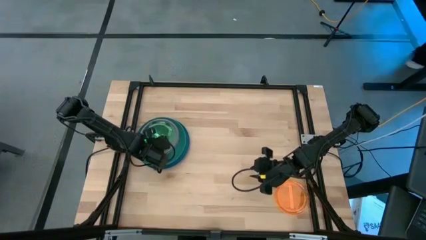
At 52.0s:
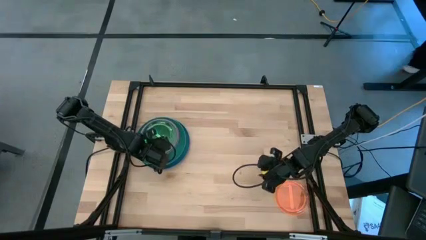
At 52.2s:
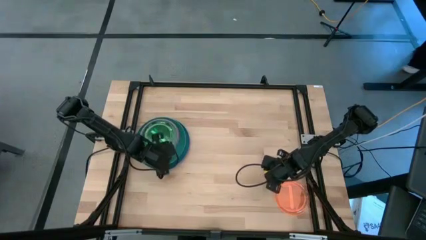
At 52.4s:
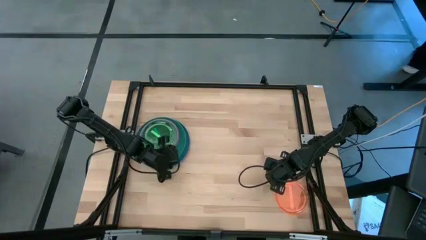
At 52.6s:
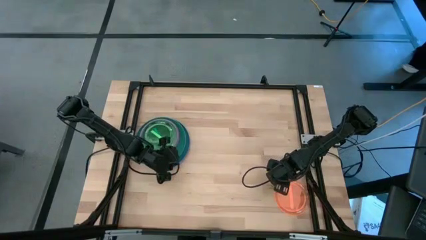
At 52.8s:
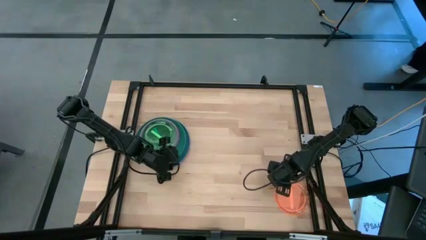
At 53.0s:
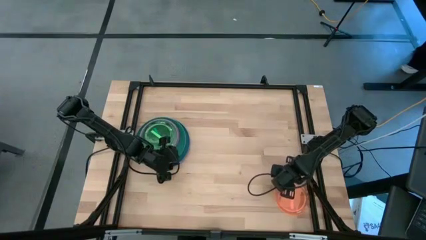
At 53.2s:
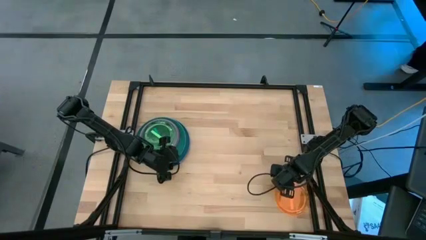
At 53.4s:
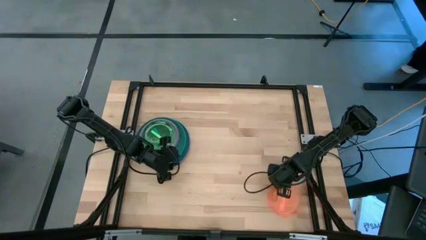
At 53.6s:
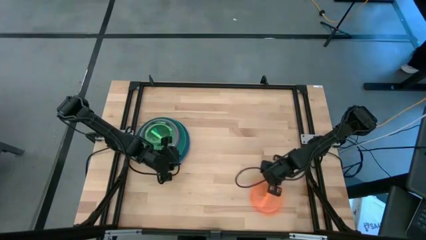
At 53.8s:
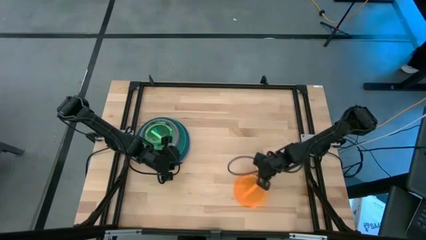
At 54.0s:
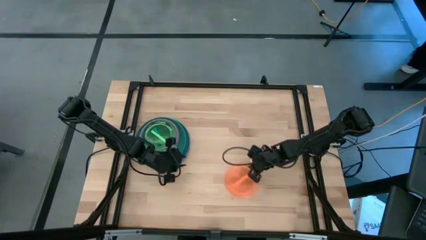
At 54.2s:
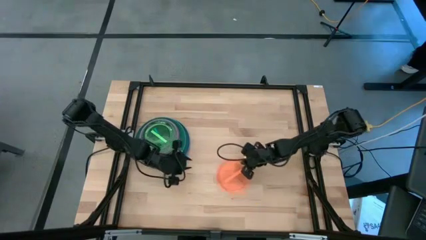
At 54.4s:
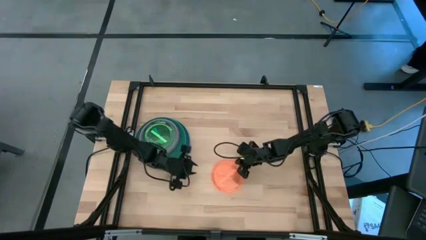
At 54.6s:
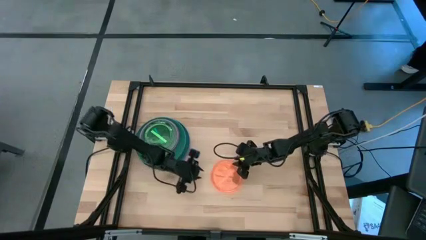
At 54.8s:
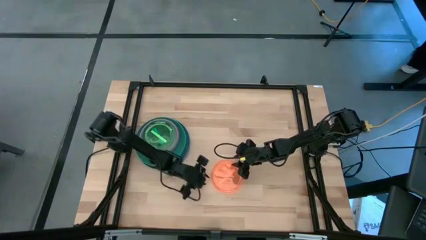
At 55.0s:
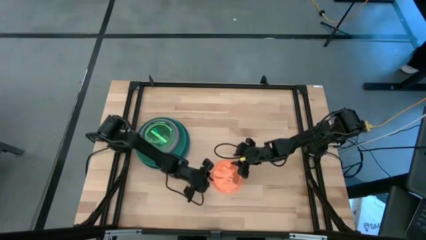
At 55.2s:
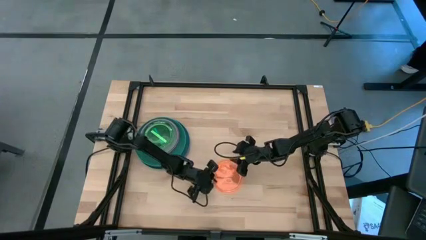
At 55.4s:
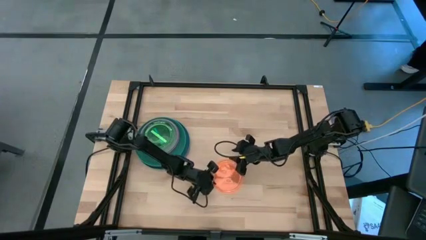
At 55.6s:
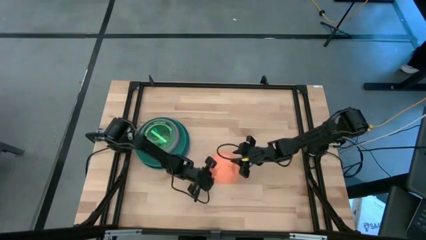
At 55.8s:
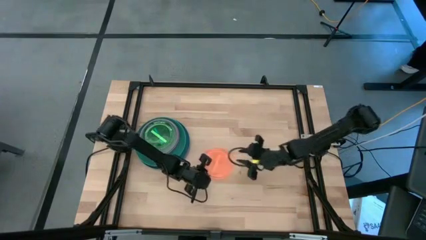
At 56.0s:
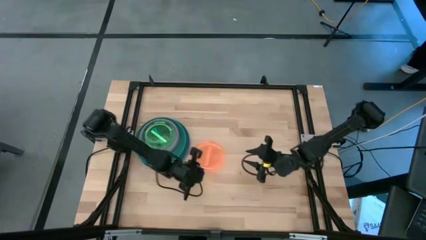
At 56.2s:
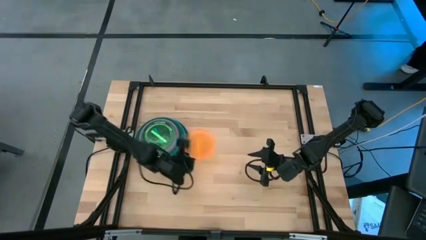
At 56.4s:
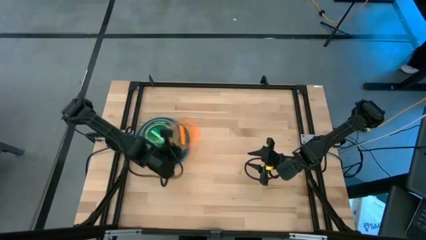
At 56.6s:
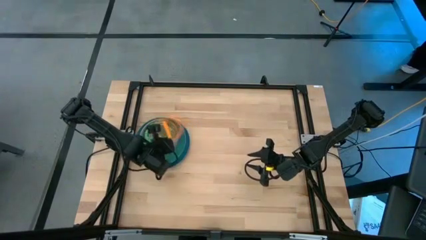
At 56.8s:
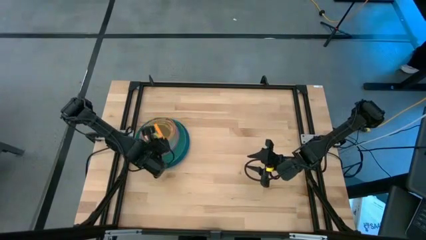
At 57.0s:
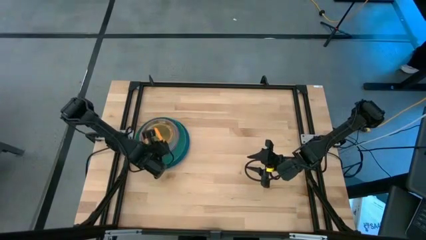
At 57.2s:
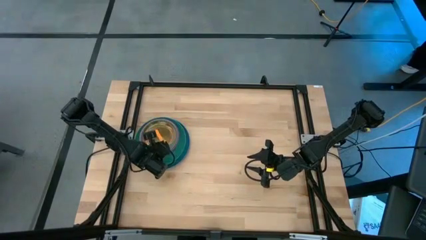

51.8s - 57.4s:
Task: Stack plastic plates
Stack the small orange plate on top of the small light green plate

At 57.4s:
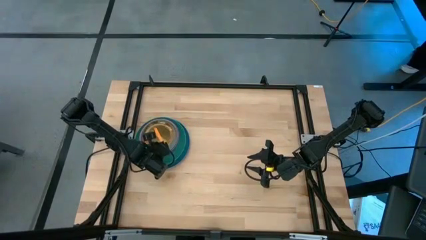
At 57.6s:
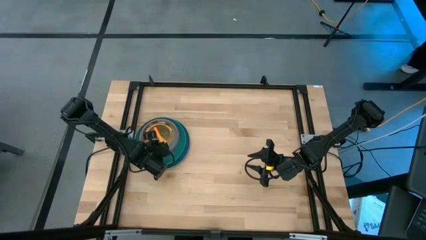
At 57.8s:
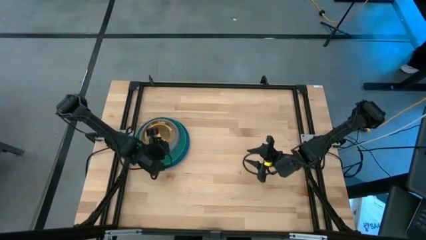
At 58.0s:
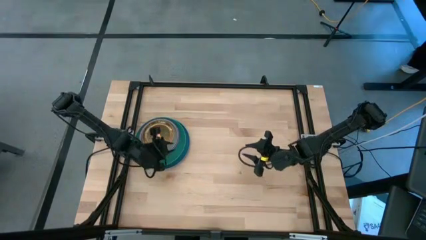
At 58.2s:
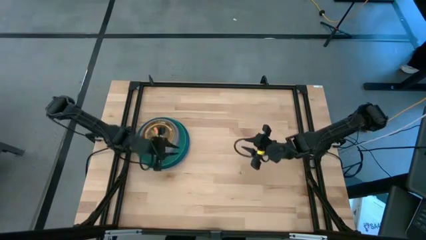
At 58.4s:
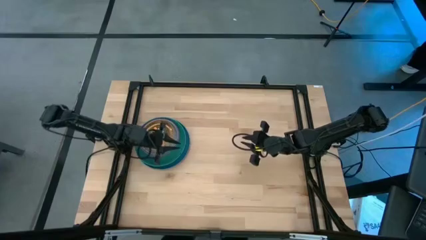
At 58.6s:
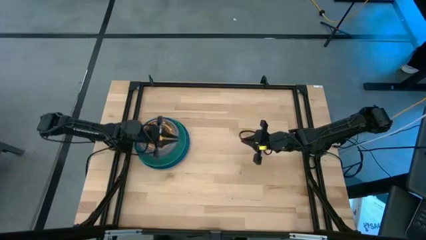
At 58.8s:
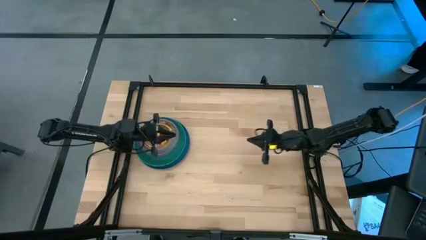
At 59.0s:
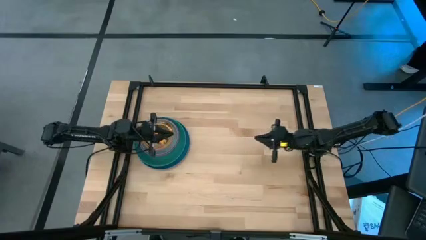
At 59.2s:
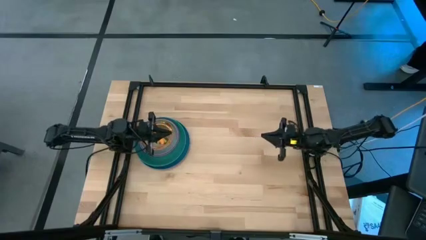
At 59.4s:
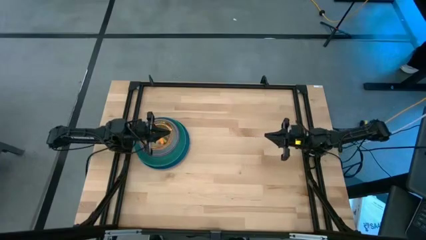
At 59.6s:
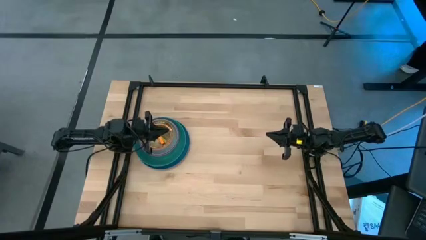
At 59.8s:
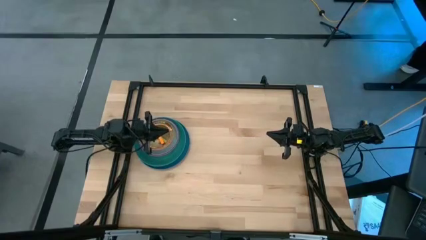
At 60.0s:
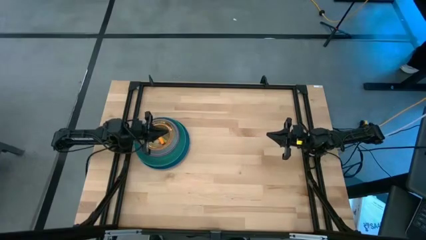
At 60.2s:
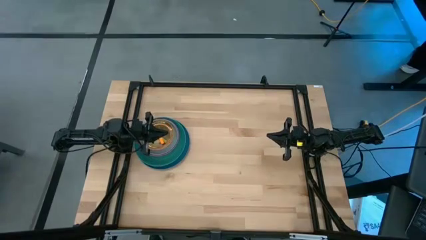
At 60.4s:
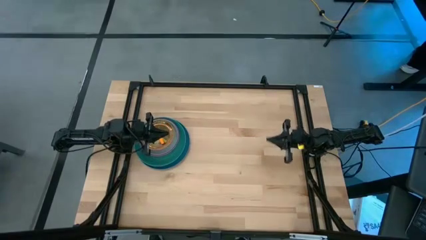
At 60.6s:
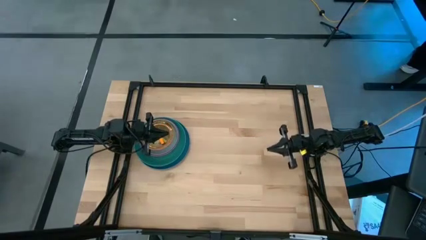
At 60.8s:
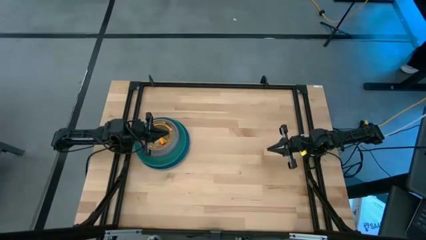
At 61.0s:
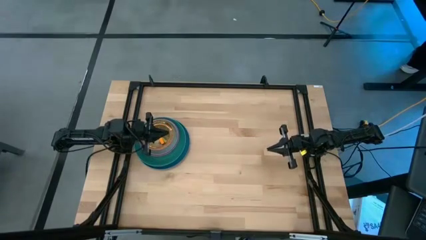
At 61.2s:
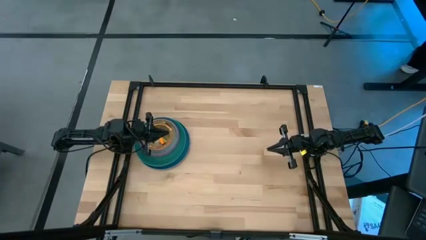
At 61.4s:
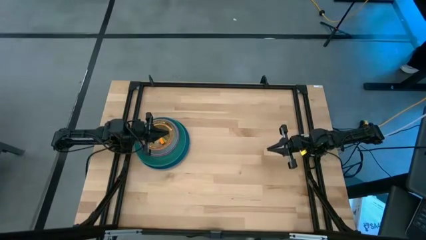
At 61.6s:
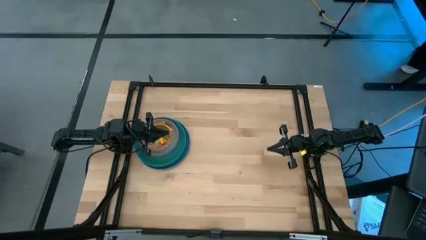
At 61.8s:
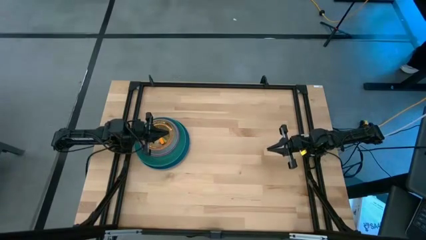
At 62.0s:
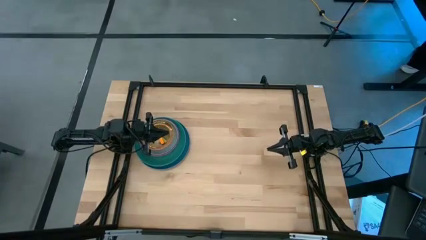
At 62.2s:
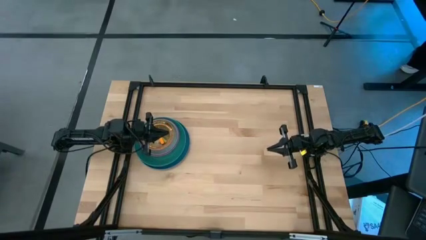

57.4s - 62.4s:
Return to Home Position
